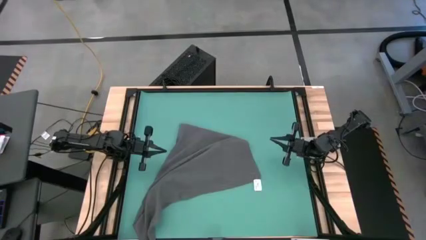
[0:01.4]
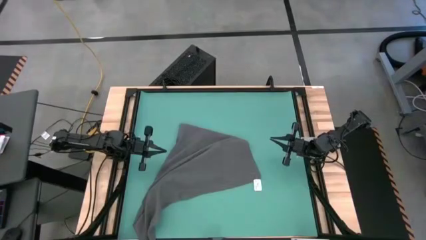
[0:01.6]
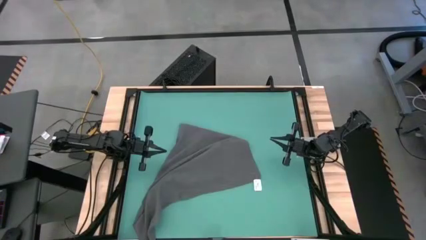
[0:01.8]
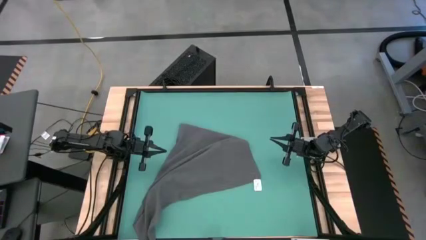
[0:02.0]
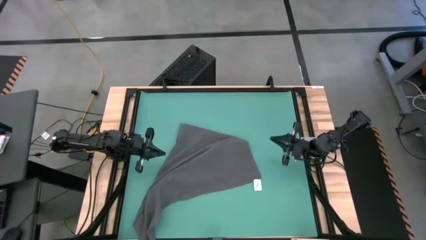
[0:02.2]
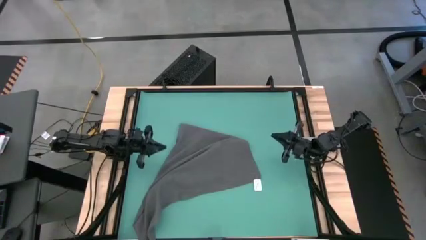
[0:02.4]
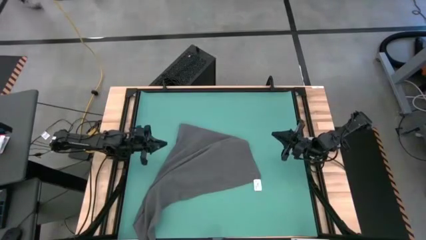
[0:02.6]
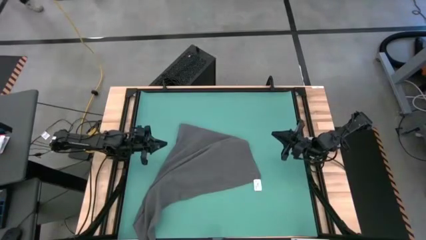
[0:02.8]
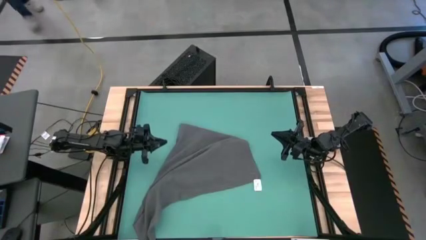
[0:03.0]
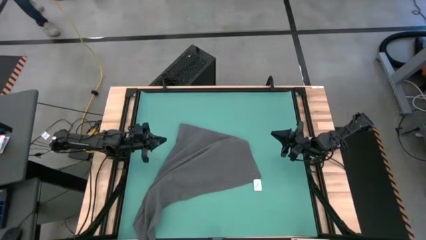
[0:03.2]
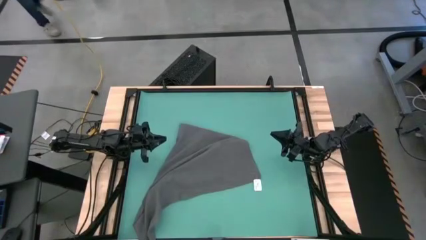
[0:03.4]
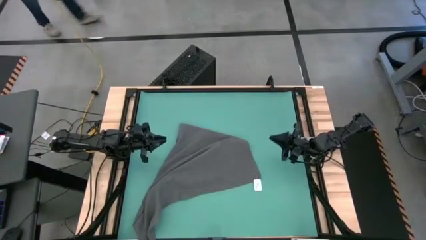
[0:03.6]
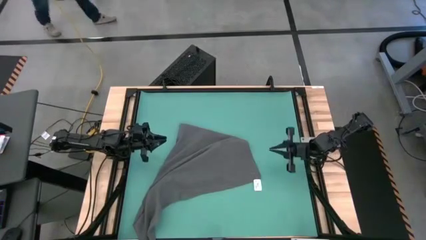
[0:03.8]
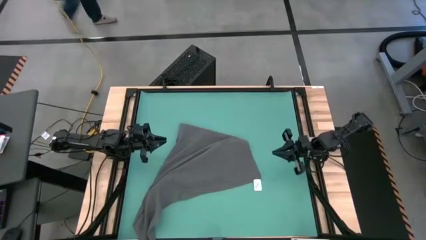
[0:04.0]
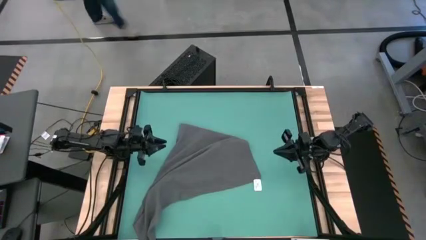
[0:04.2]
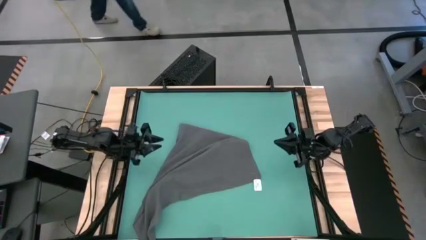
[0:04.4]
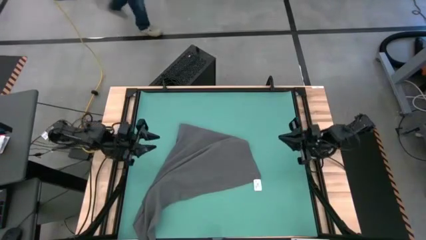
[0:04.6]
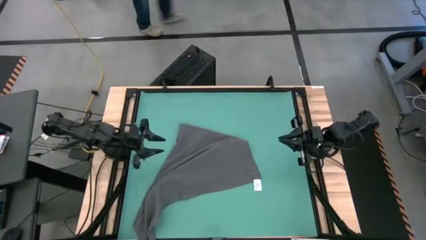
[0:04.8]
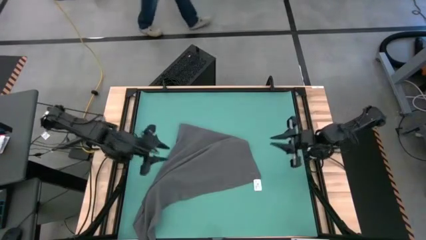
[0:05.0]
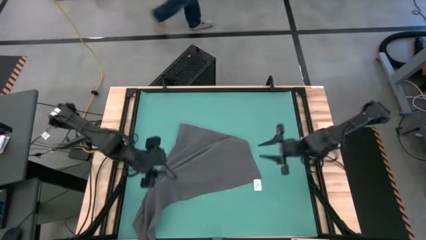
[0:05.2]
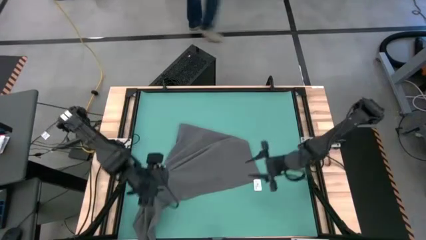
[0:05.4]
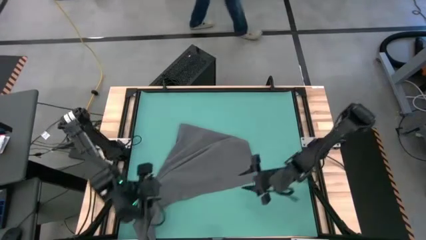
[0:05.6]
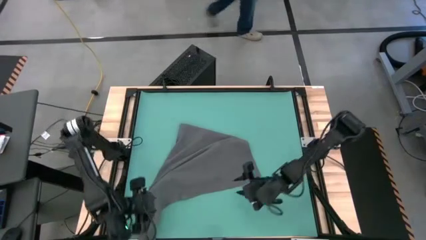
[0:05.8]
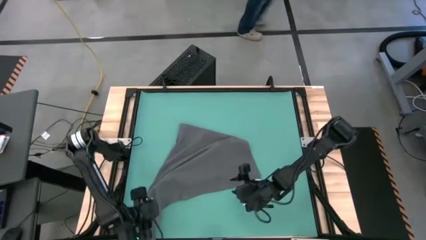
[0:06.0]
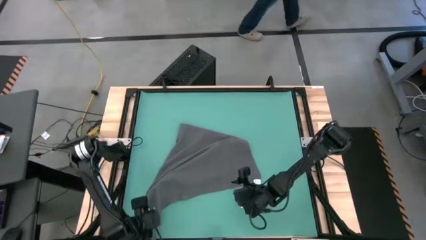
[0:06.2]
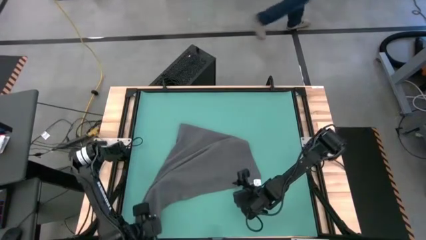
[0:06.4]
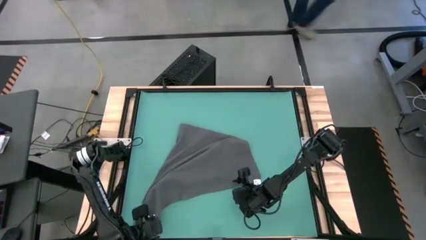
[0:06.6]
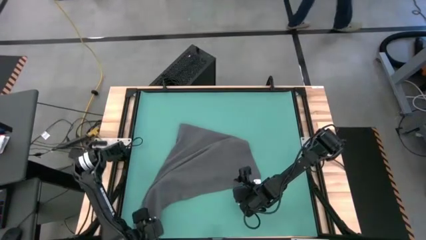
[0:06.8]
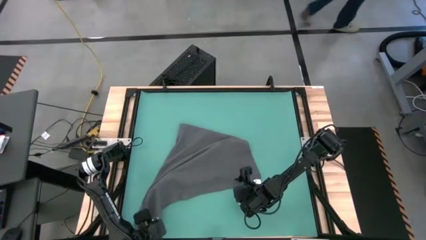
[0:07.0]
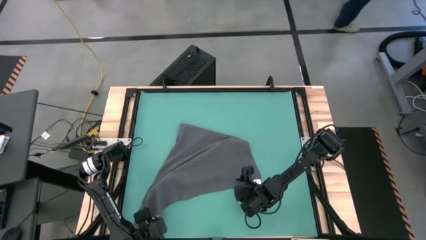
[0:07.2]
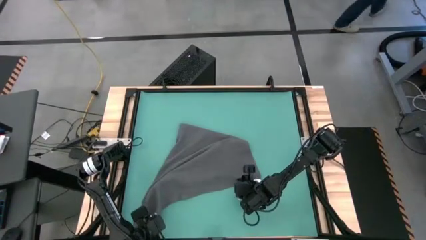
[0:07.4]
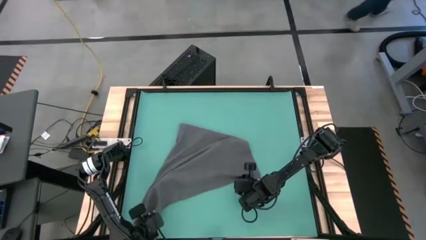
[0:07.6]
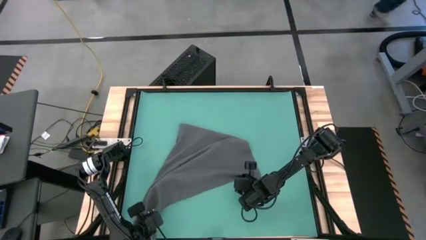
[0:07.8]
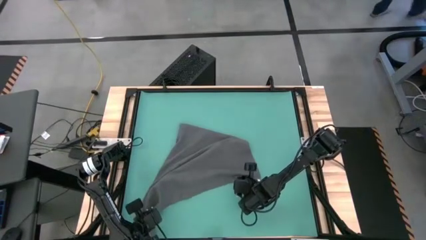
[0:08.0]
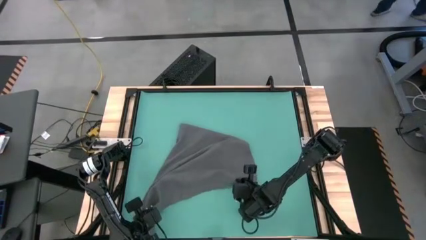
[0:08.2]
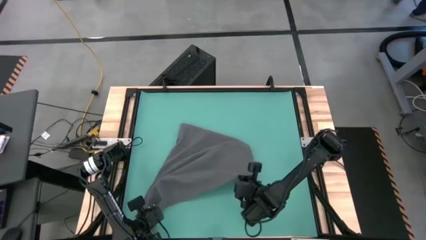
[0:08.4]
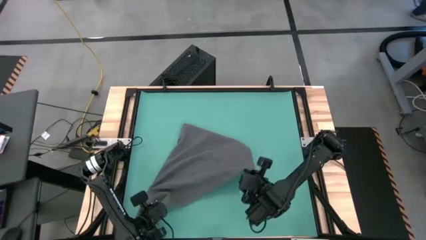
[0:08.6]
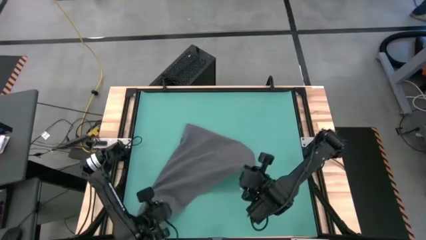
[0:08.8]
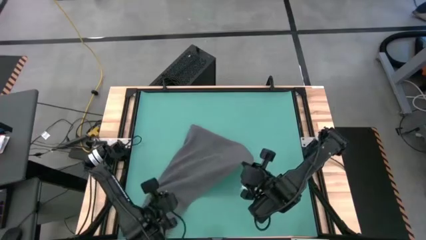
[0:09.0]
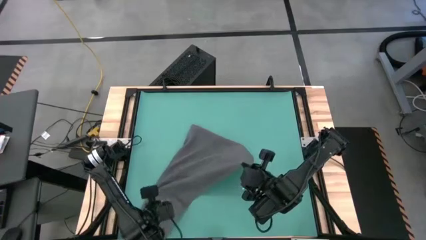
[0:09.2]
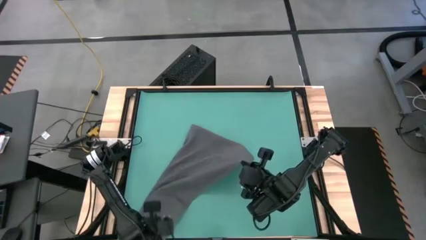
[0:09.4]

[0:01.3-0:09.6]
Task: Roll towel
Roll the gray towel

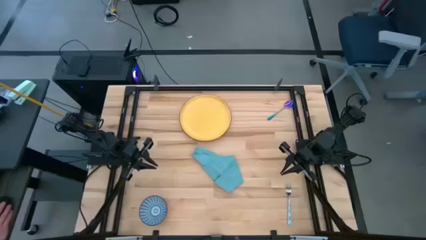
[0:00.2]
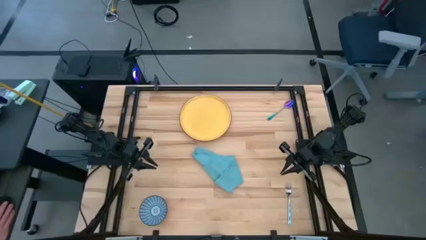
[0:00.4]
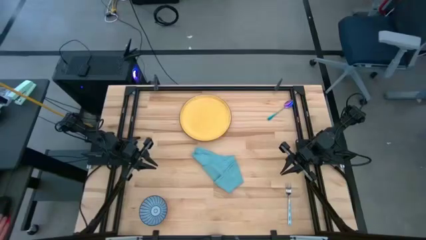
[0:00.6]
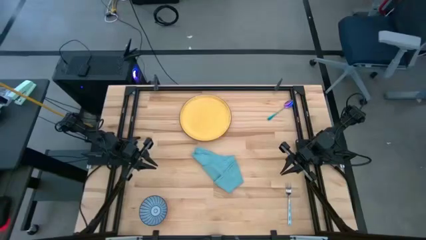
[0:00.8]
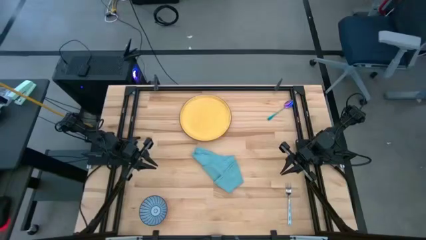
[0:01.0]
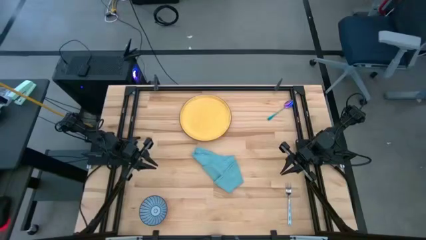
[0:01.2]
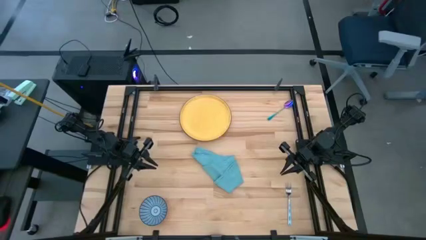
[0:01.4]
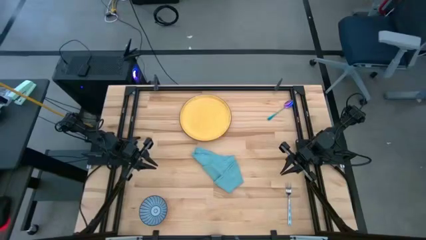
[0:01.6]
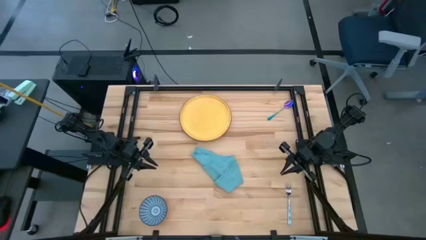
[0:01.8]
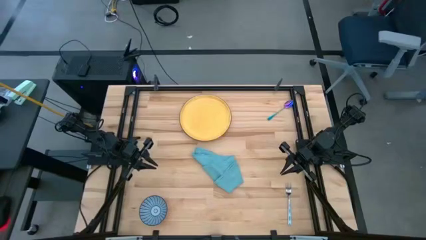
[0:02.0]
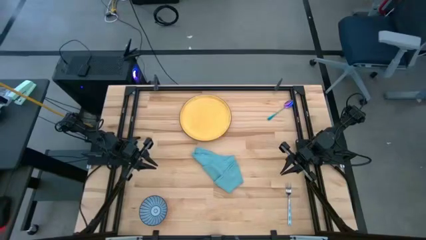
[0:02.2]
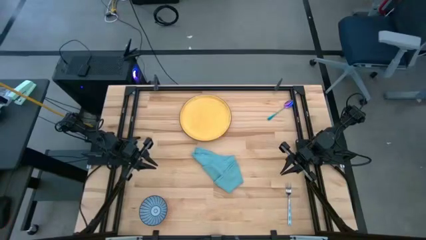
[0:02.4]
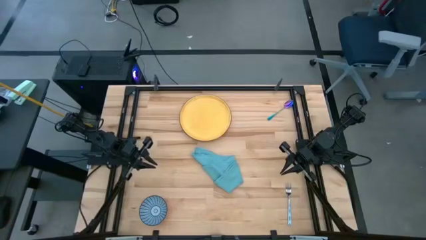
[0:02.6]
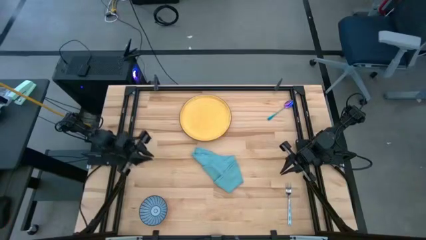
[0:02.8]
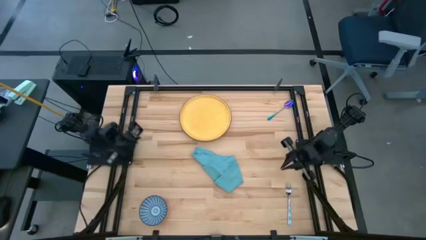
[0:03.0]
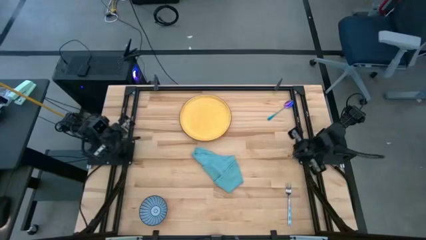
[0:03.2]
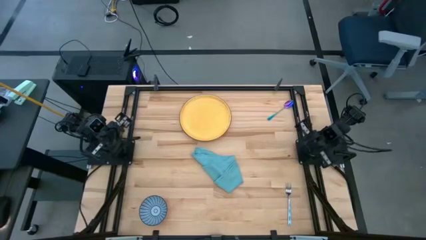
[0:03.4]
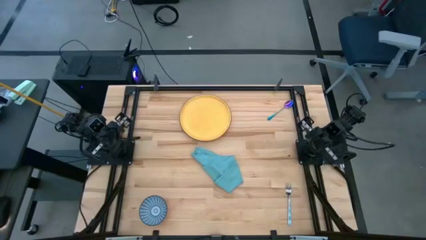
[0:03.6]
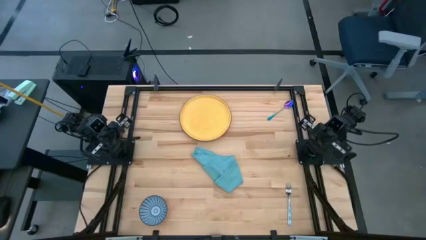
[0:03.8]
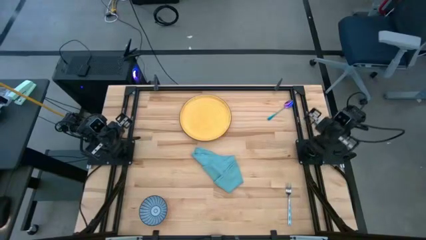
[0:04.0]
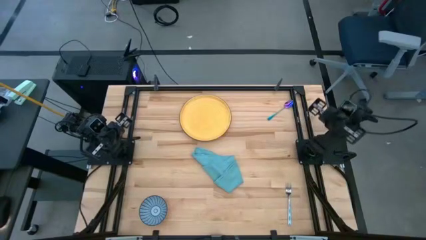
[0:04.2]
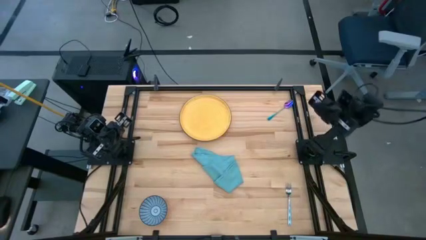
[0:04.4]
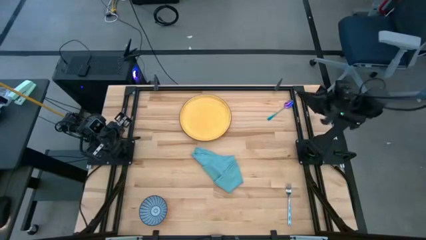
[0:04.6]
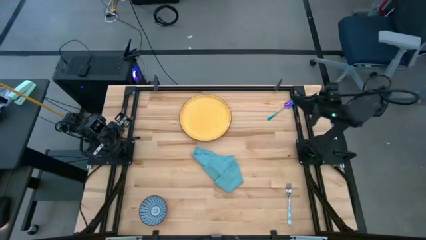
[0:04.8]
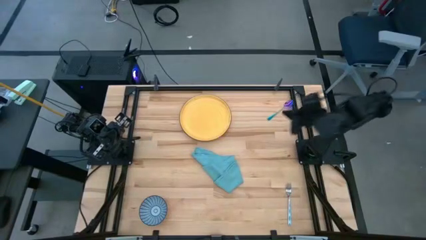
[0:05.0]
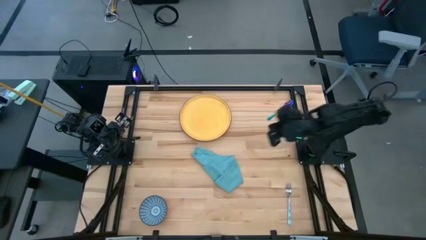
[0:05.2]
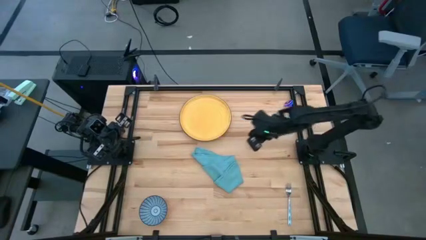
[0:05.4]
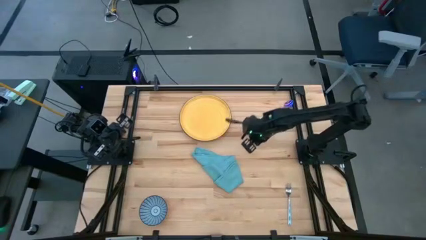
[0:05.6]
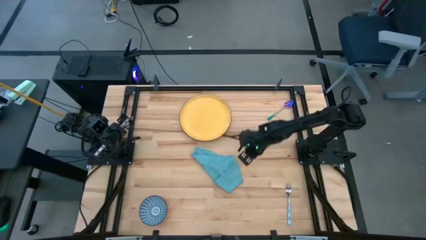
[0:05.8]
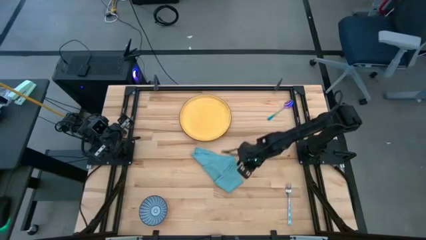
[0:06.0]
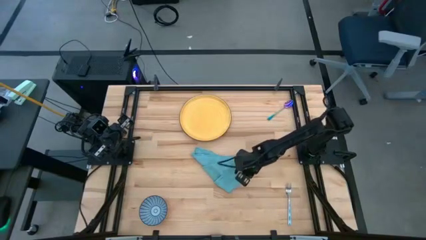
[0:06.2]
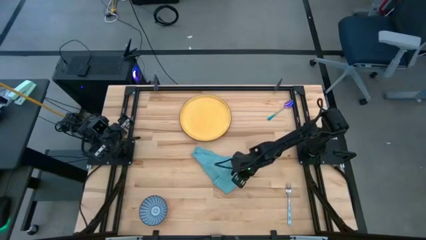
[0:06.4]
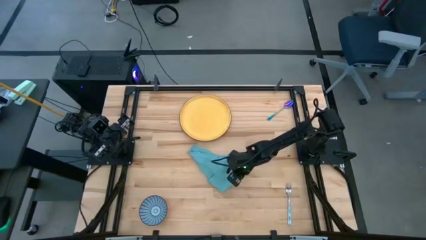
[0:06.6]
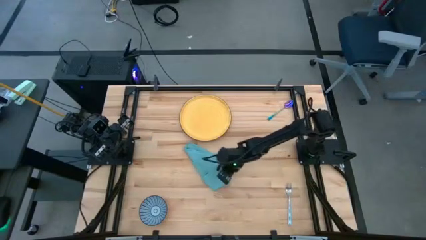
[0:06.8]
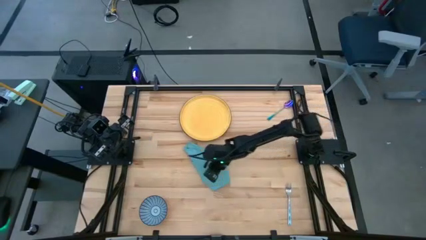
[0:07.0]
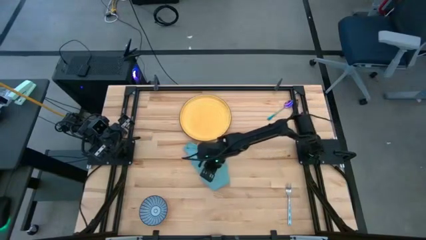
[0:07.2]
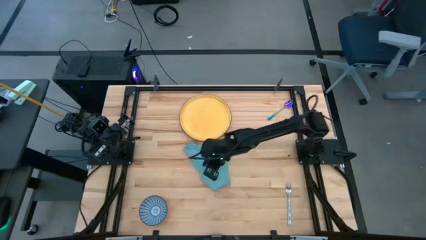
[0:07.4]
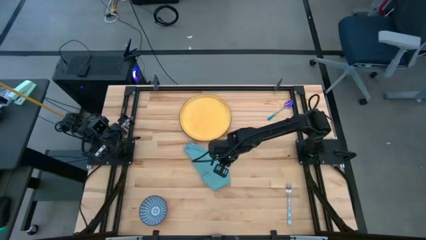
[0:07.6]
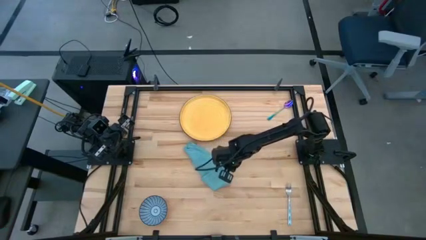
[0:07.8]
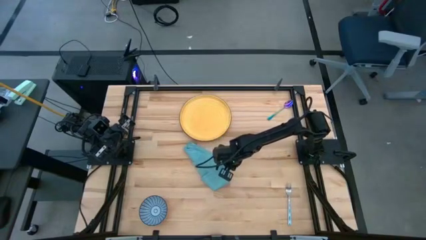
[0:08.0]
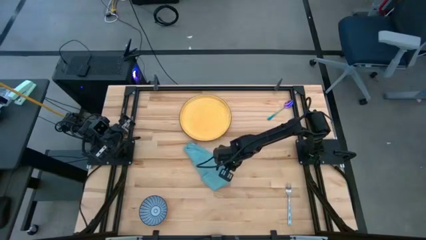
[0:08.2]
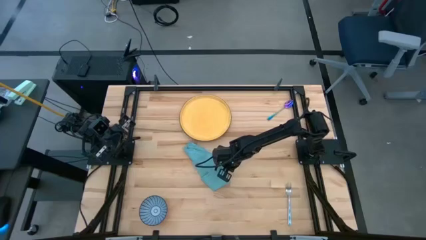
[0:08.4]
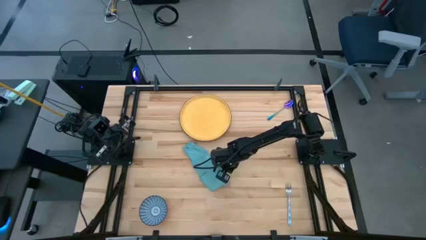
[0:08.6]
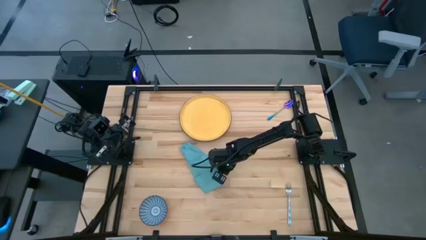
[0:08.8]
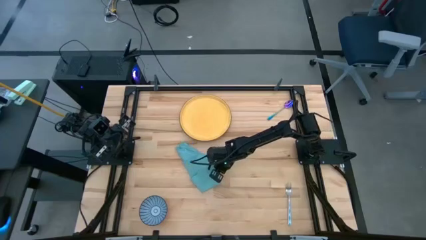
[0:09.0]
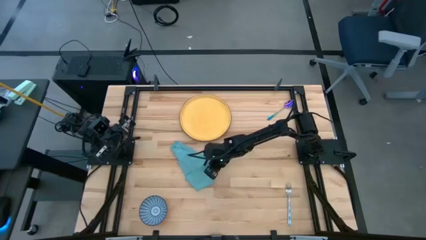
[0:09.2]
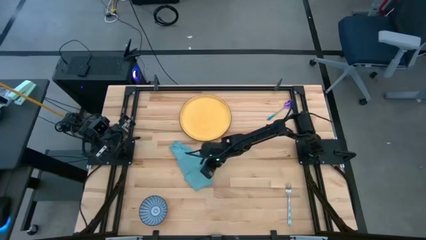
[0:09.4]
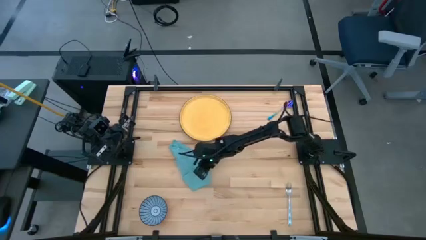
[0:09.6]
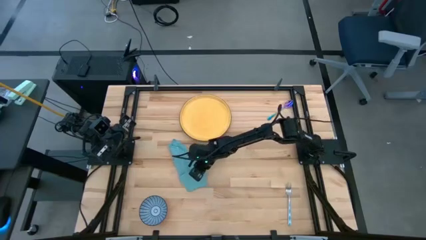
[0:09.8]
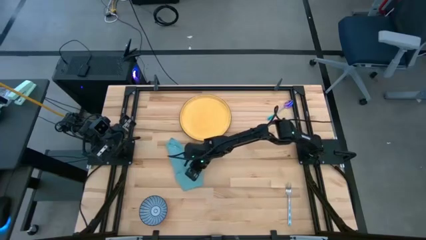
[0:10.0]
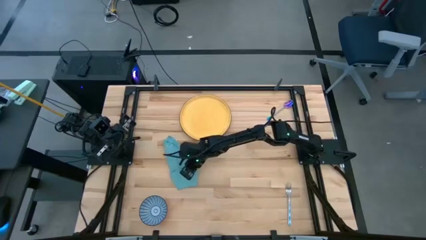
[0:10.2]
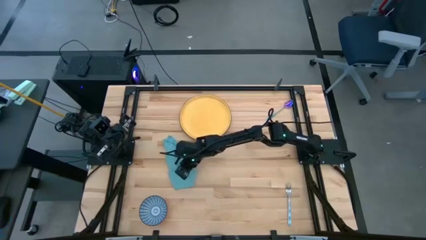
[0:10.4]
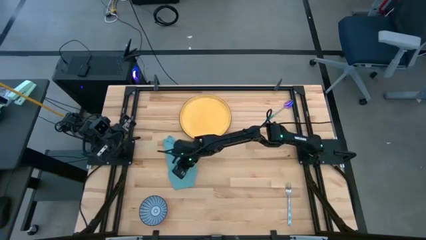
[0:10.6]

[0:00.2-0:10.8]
Task: Set table place
Move the blue napkin to the middle left of the table
